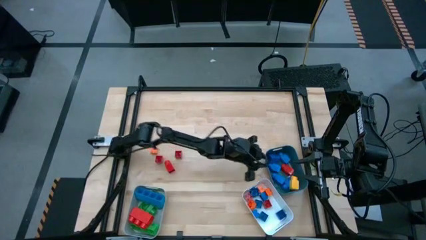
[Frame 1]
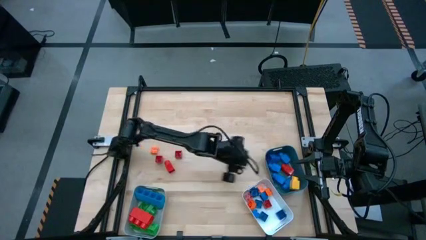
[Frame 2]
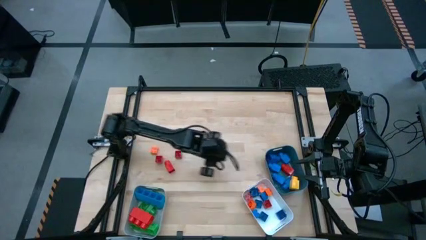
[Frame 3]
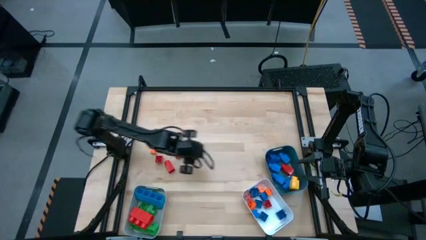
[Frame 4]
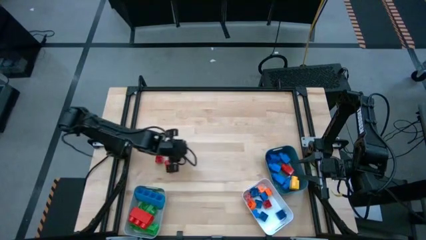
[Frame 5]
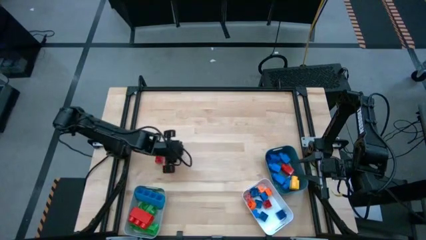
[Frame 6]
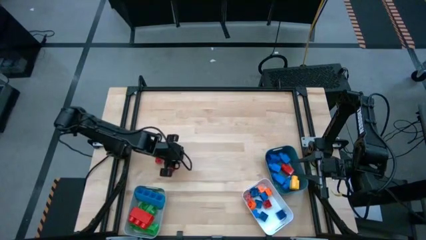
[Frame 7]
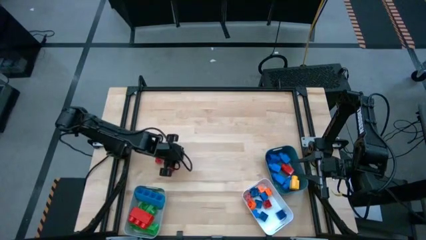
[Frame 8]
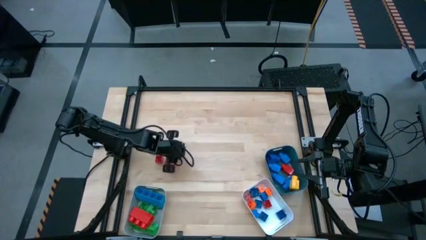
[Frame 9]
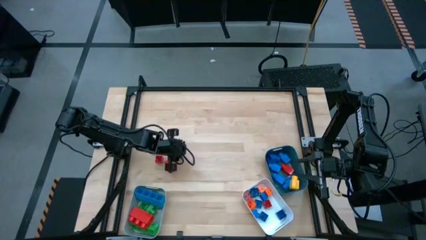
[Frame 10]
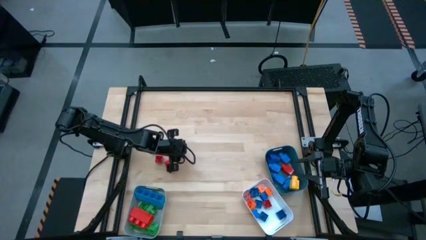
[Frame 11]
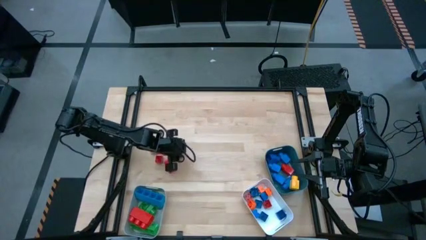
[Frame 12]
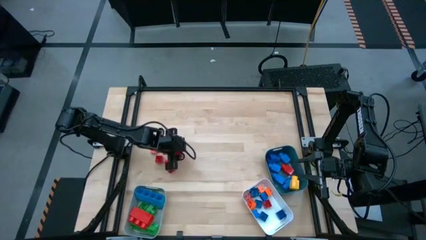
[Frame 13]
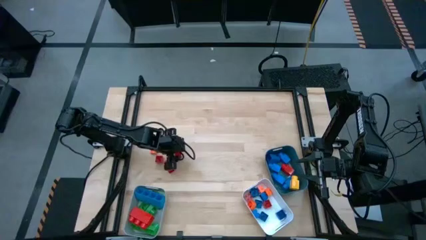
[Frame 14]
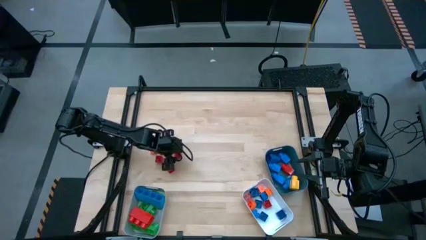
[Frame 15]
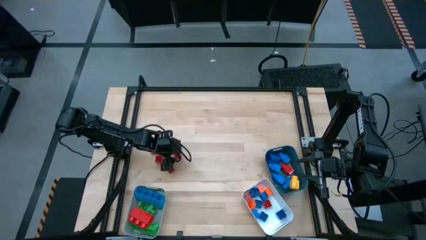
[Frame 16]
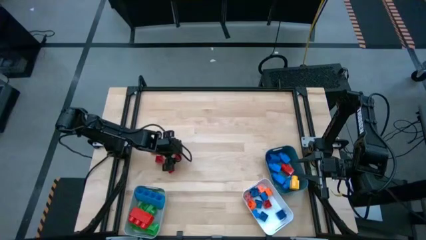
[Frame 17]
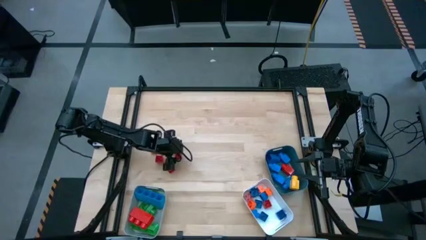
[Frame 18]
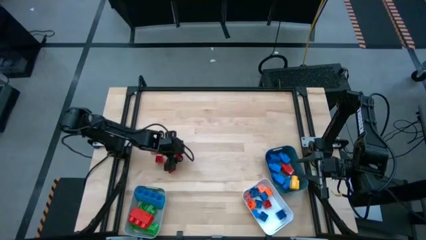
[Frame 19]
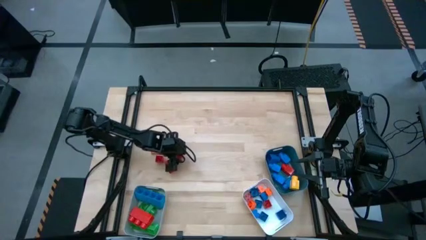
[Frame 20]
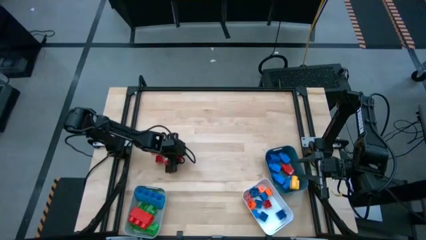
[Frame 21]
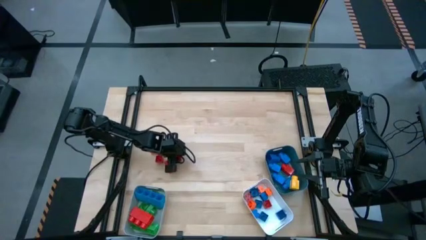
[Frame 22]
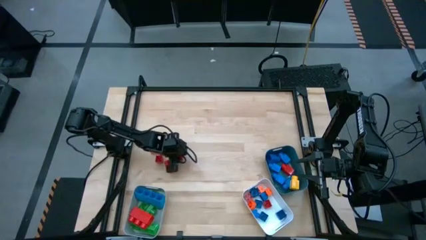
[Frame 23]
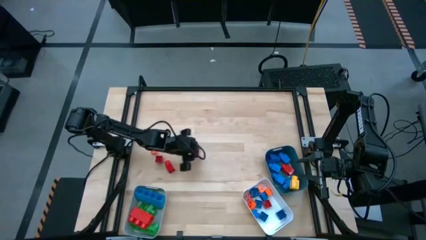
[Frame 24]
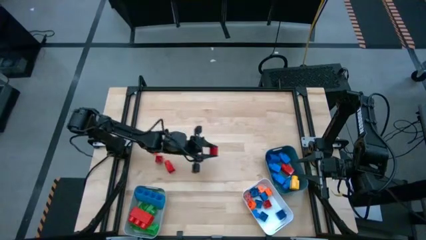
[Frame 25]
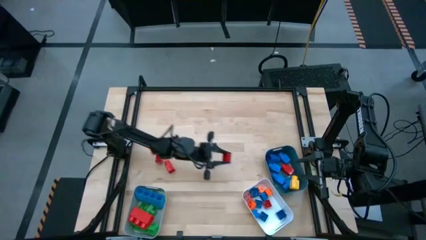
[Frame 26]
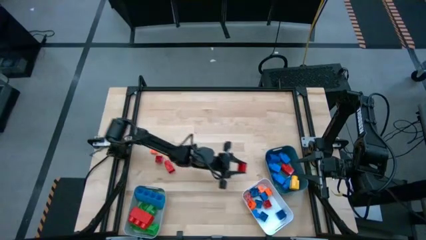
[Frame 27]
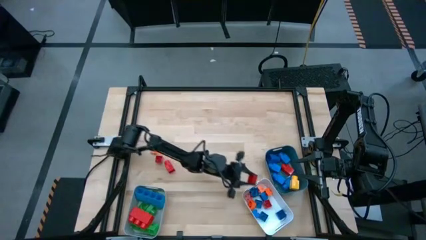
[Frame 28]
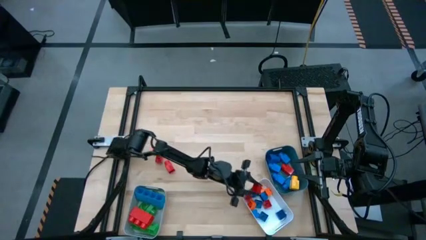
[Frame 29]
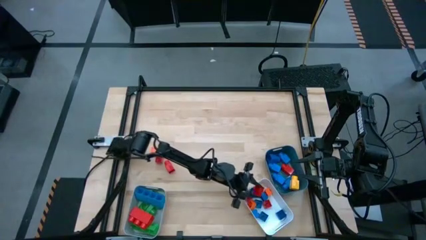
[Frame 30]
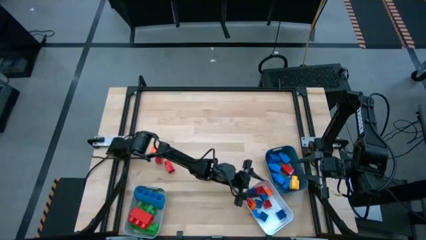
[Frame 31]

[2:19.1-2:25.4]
Task: Sort blocks by size
Put the small square red game piece into the white bin

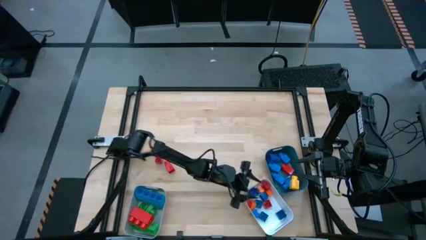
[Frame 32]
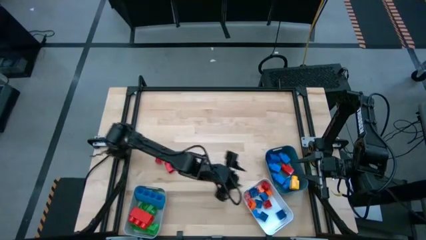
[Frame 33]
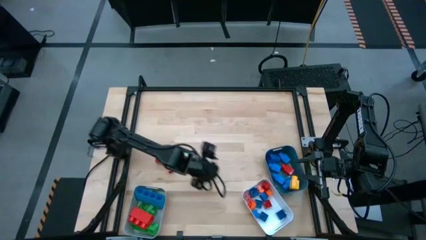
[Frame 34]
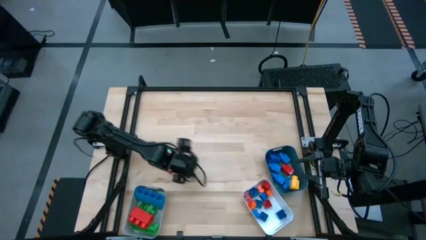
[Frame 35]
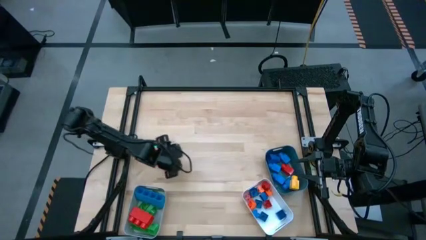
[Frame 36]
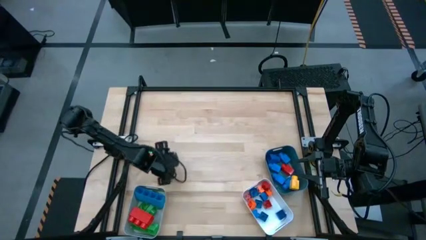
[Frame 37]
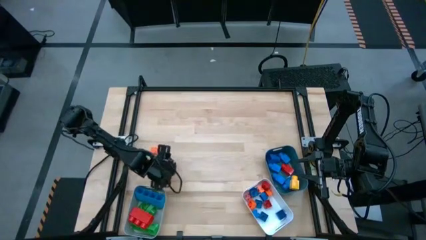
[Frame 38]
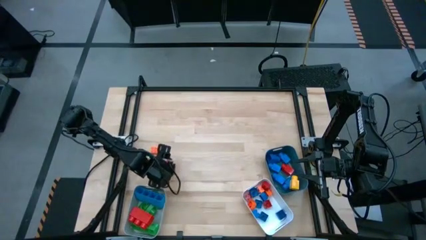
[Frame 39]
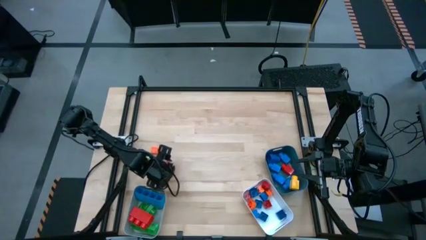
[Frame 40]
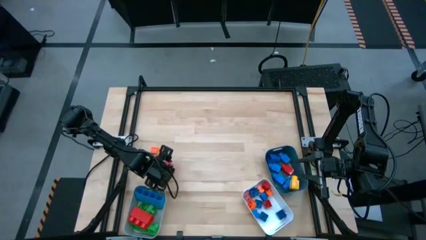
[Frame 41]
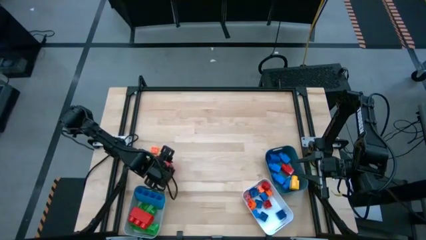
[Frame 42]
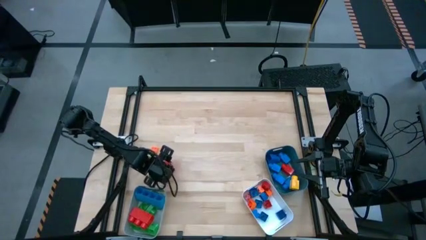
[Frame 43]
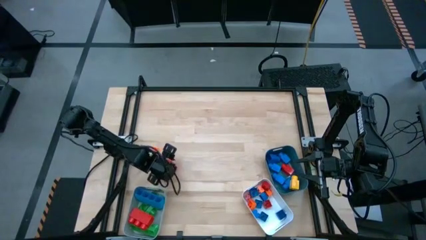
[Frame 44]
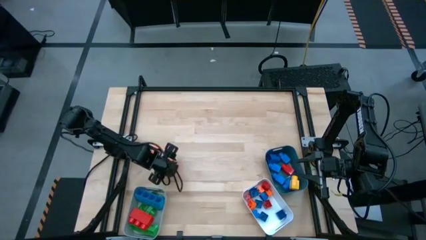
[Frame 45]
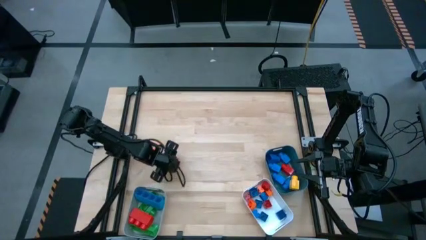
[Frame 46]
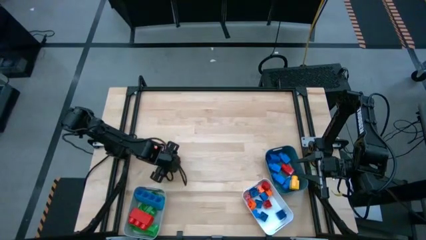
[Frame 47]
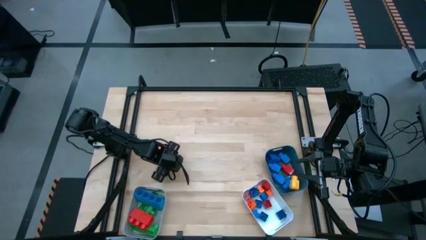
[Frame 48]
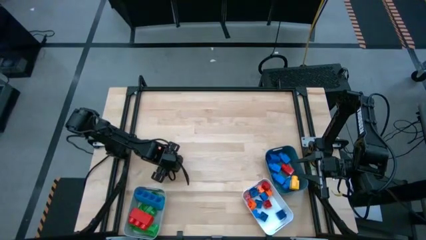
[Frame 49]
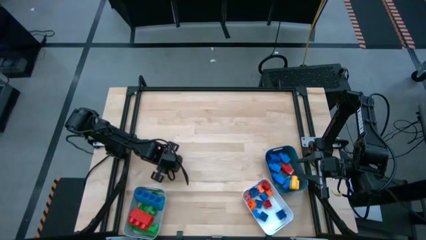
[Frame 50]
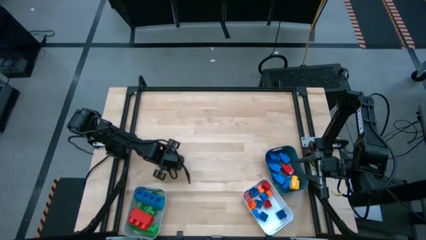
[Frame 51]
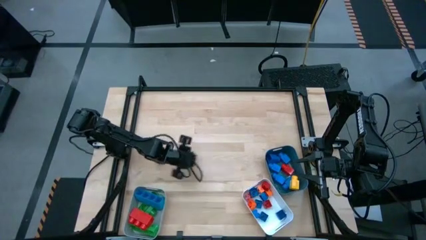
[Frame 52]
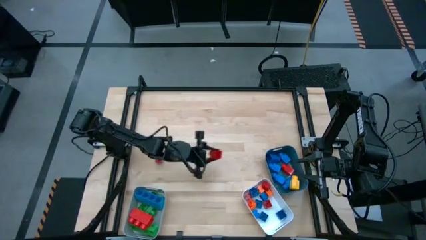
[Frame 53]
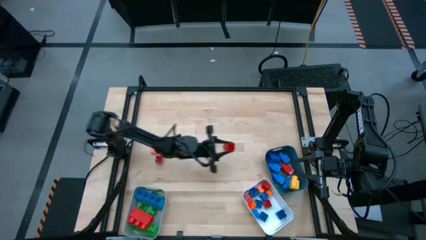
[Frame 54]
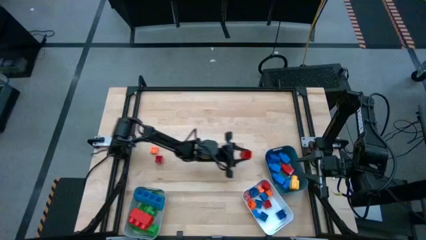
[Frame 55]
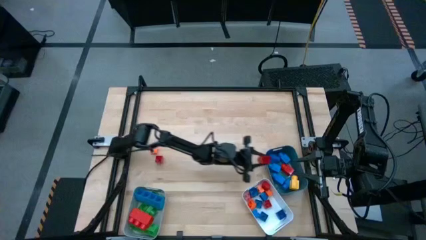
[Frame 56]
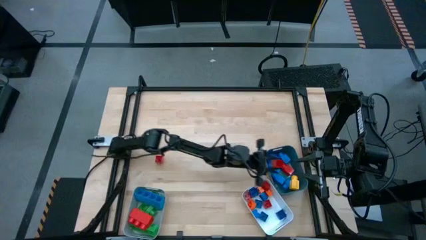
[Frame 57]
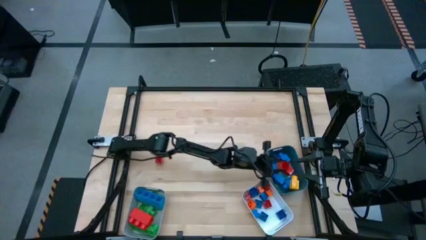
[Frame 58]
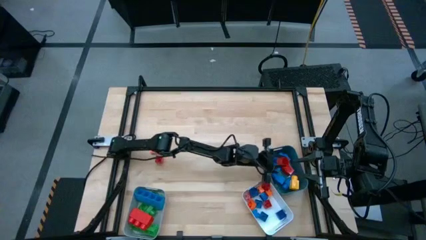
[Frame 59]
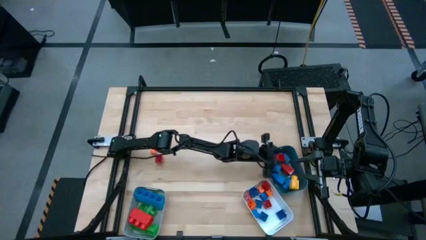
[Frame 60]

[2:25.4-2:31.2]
Put the big square red game piece into the blue bin

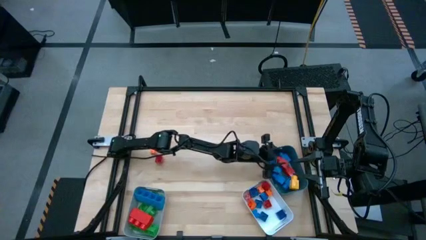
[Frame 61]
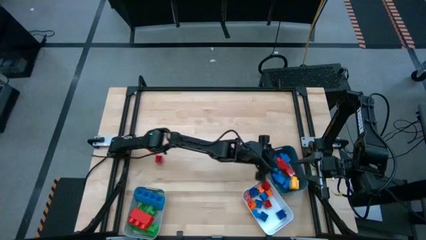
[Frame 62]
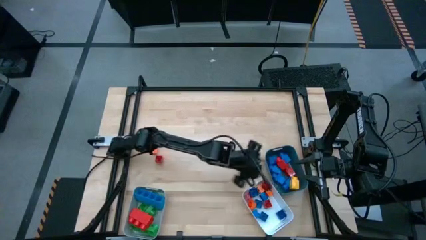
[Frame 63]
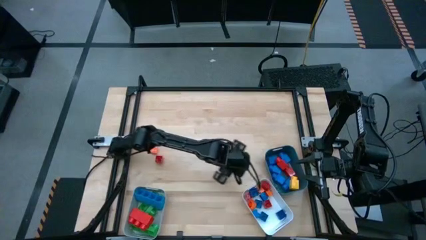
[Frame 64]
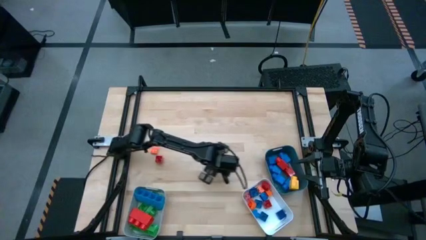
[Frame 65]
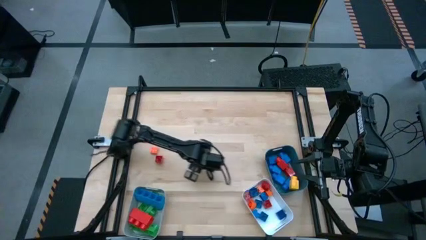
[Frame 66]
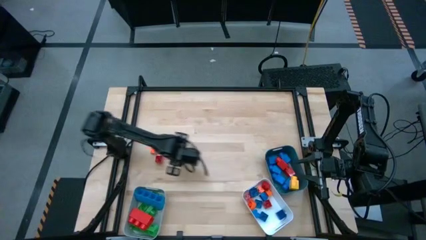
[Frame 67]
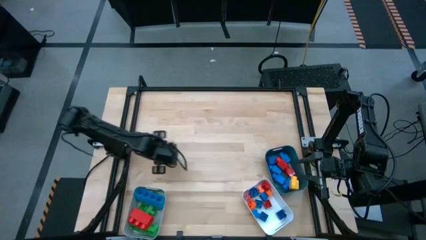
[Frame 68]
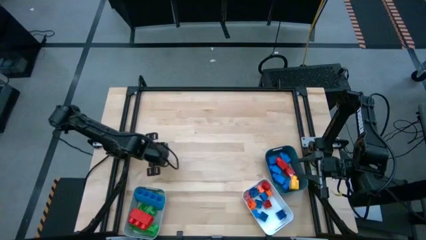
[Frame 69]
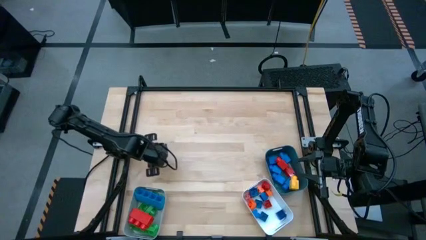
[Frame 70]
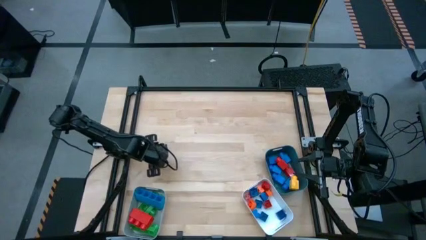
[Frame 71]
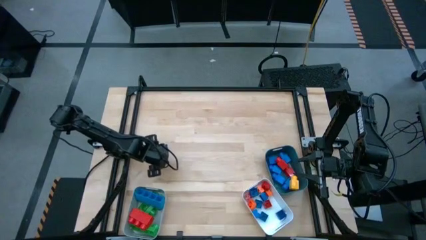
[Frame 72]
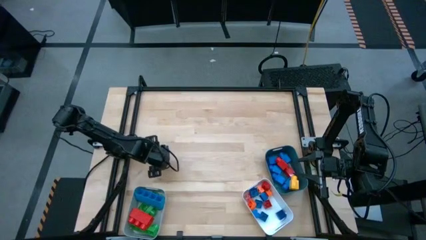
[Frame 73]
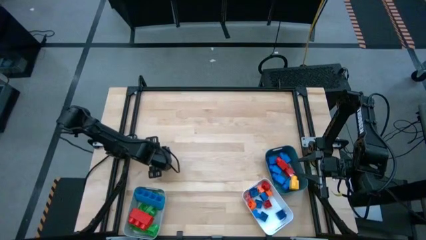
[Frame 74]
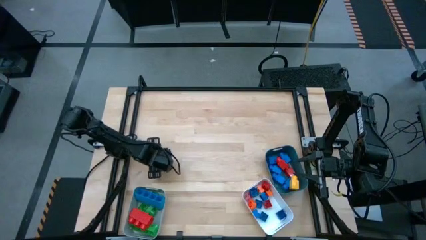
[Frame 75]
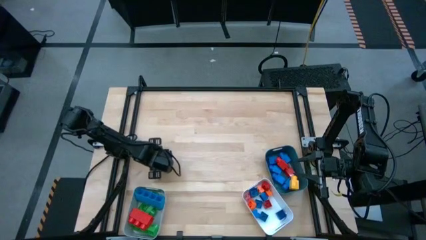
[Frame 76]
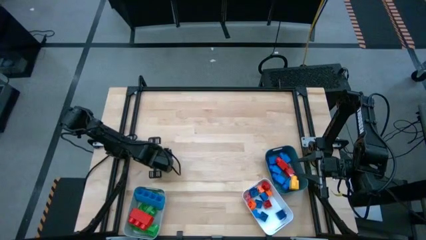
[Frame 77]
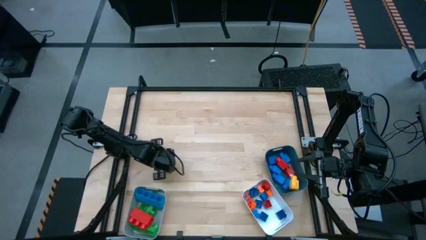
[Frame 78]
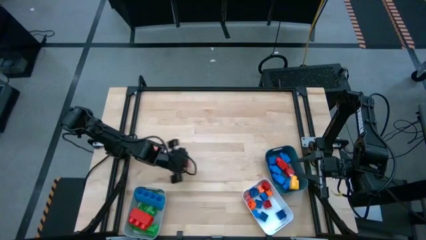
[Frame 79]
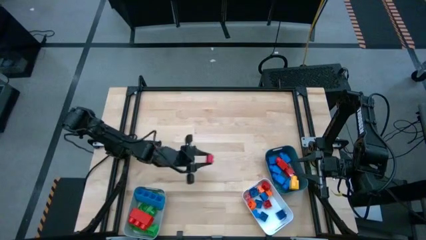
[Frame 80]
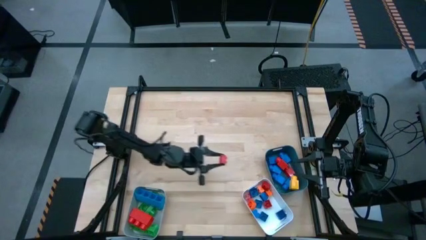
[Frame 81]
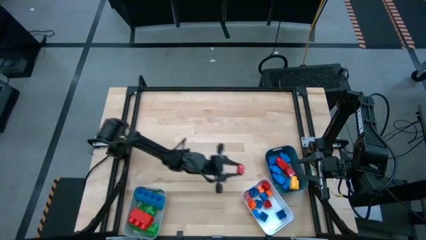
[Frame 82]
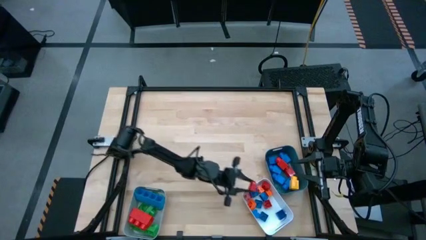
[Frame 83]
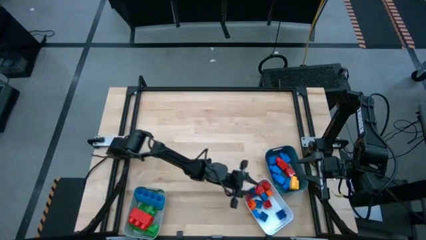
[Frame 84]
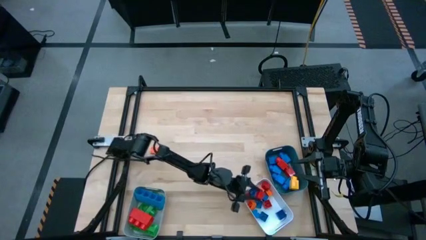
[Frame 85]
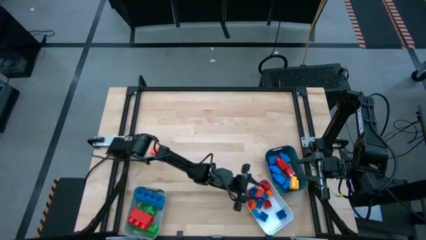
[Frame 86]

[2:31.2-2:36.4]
Put the small square red game piece into the white bin
